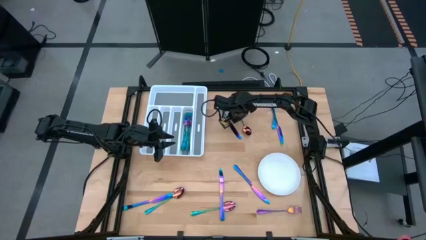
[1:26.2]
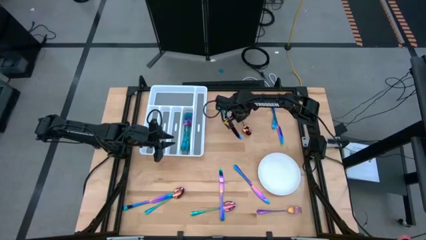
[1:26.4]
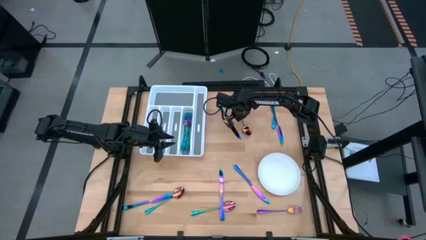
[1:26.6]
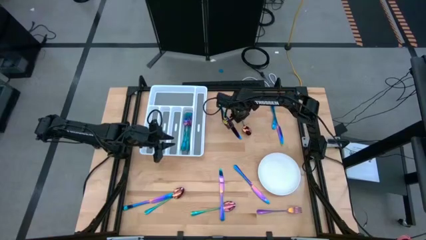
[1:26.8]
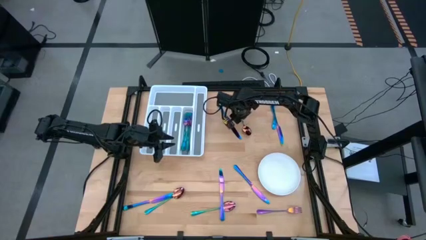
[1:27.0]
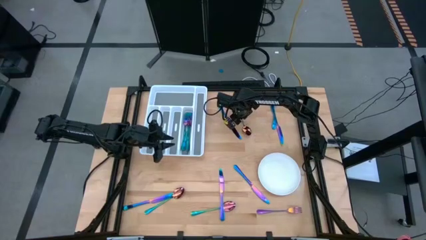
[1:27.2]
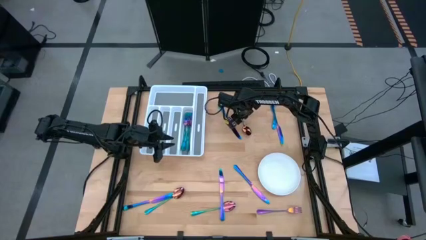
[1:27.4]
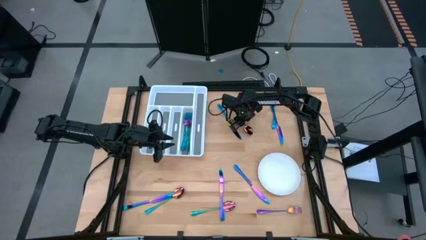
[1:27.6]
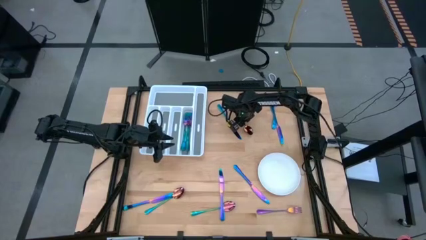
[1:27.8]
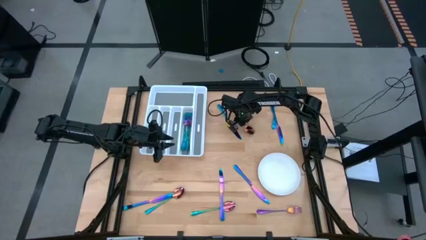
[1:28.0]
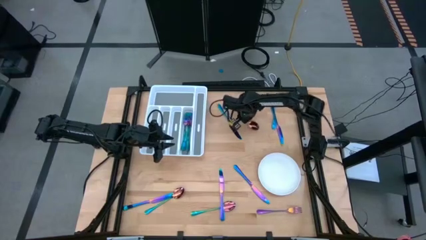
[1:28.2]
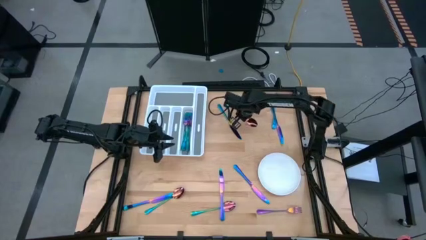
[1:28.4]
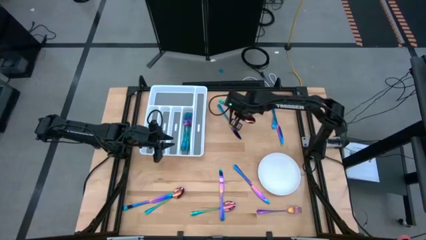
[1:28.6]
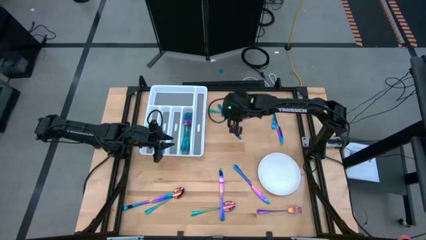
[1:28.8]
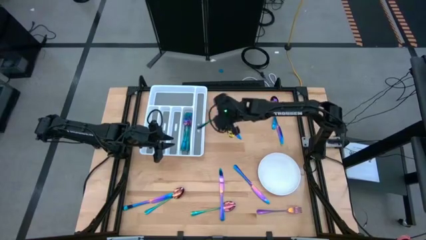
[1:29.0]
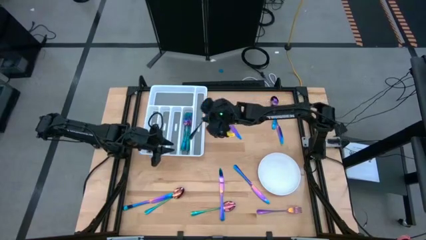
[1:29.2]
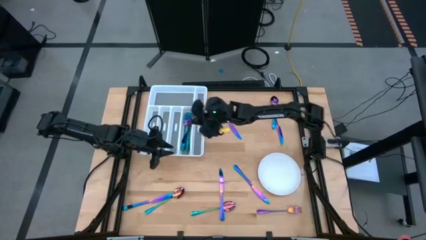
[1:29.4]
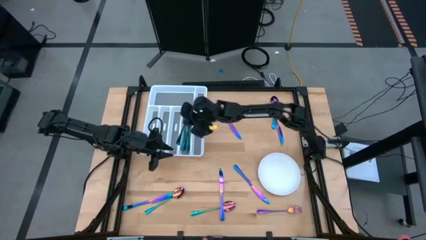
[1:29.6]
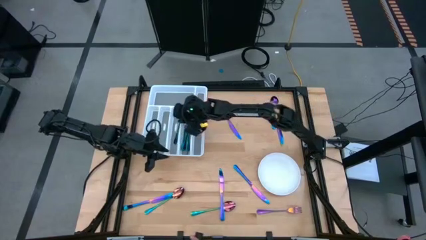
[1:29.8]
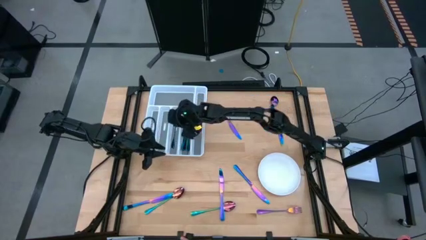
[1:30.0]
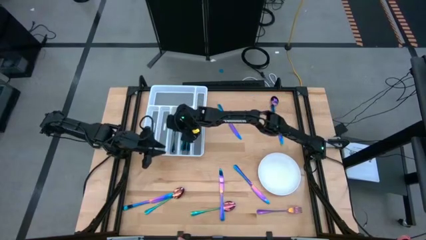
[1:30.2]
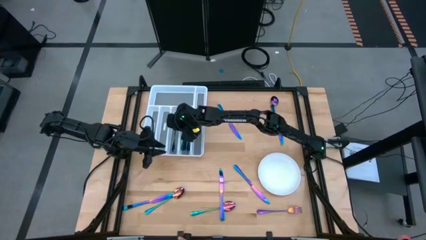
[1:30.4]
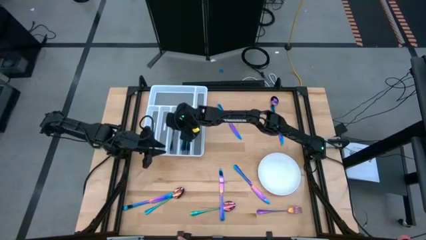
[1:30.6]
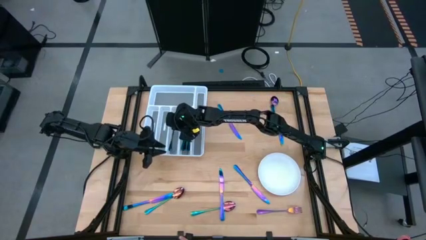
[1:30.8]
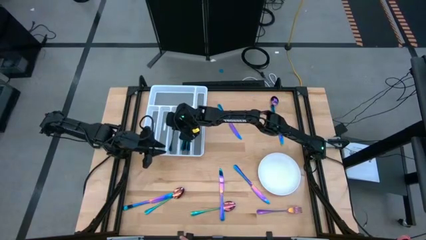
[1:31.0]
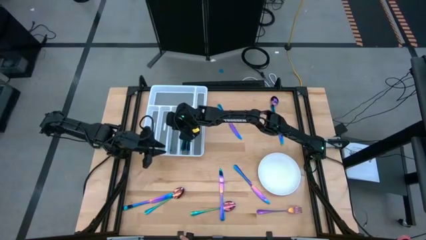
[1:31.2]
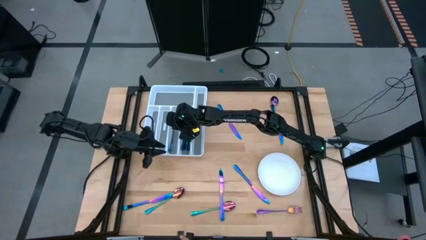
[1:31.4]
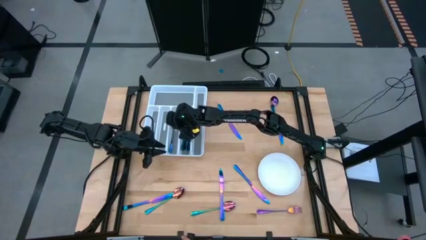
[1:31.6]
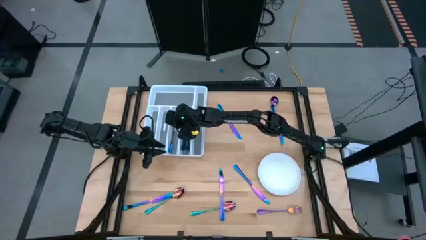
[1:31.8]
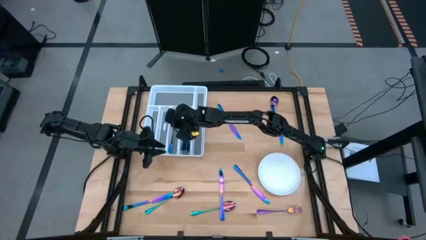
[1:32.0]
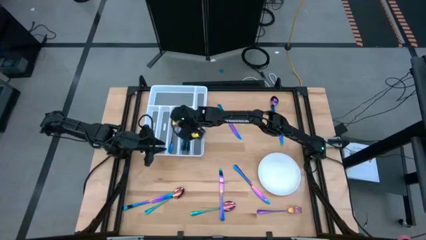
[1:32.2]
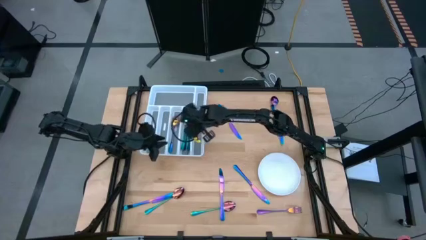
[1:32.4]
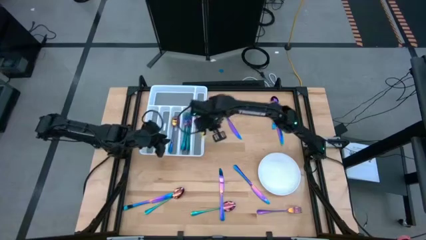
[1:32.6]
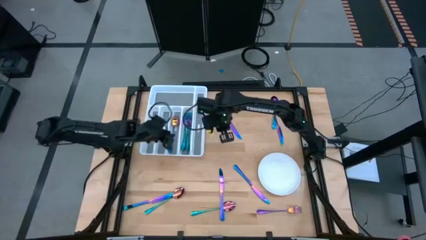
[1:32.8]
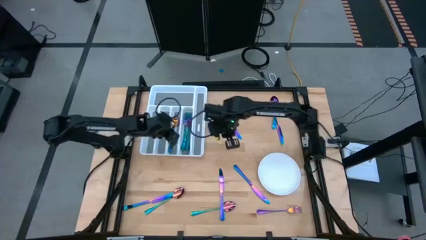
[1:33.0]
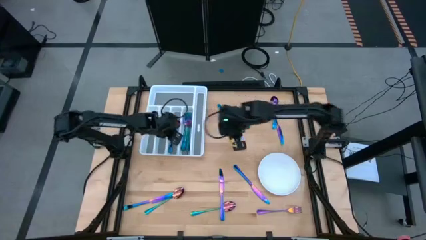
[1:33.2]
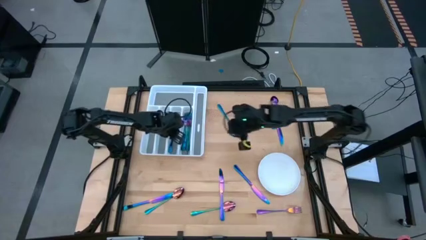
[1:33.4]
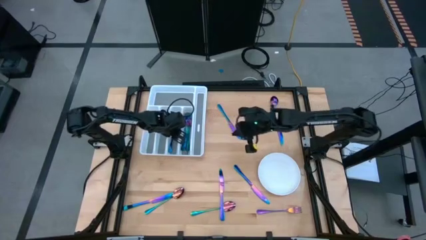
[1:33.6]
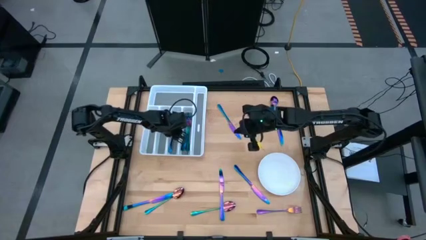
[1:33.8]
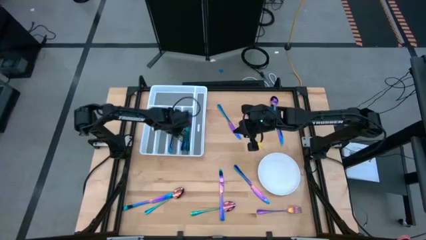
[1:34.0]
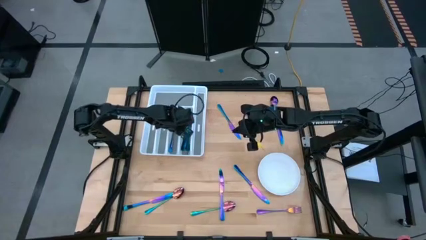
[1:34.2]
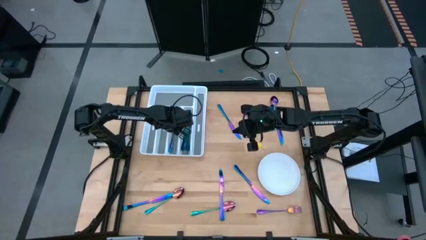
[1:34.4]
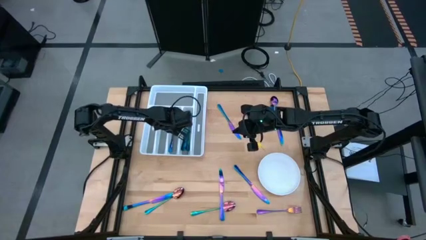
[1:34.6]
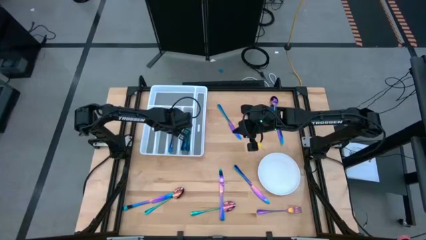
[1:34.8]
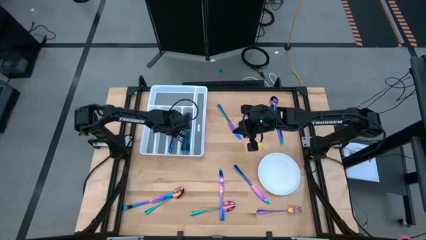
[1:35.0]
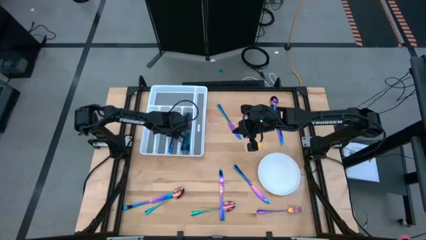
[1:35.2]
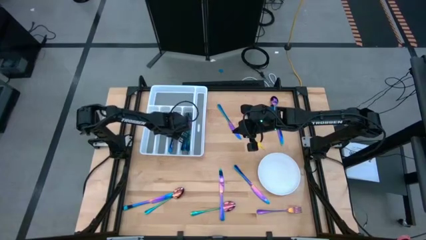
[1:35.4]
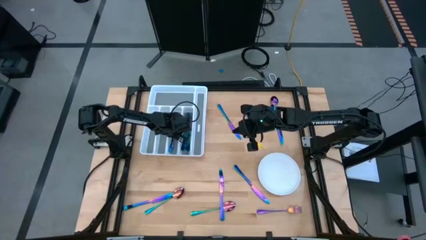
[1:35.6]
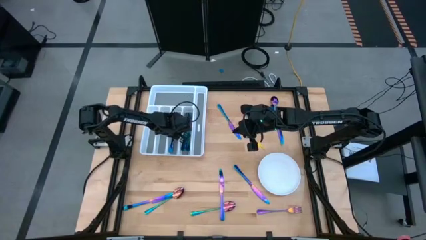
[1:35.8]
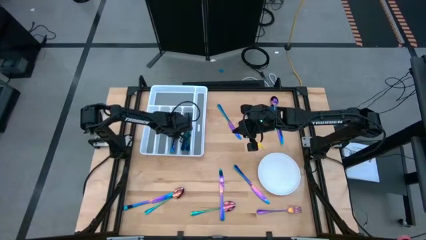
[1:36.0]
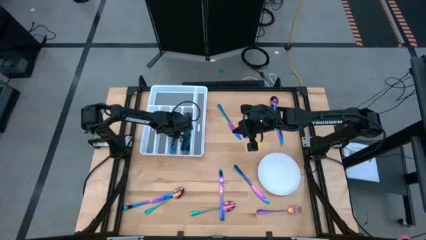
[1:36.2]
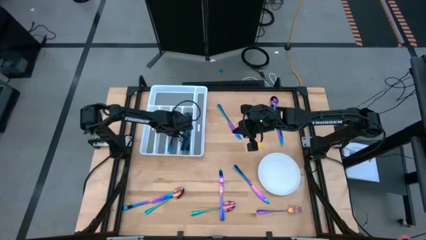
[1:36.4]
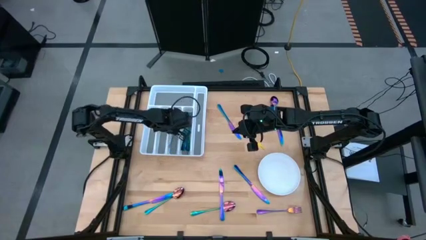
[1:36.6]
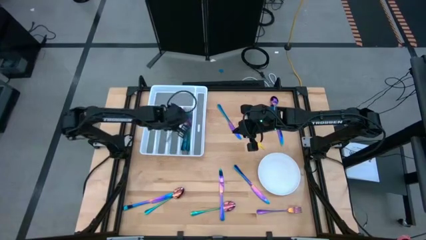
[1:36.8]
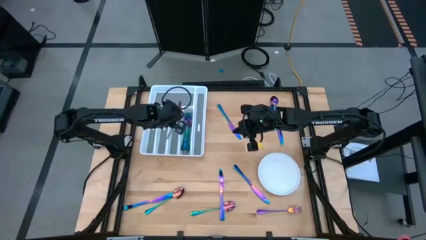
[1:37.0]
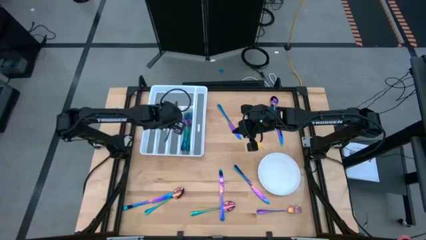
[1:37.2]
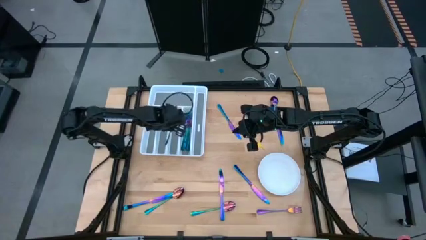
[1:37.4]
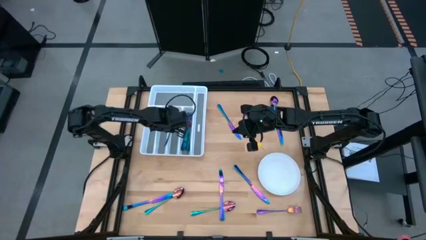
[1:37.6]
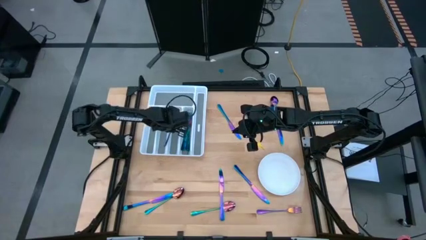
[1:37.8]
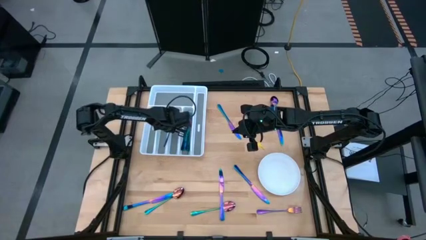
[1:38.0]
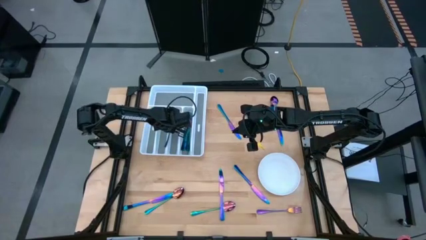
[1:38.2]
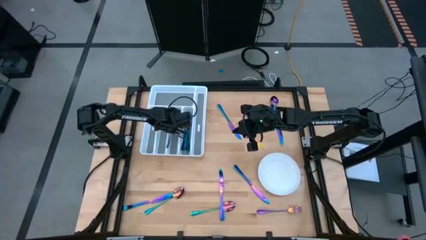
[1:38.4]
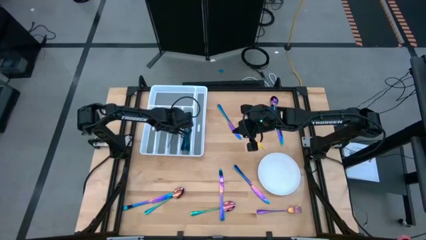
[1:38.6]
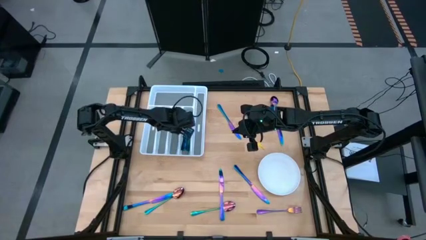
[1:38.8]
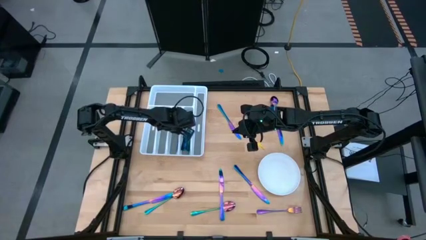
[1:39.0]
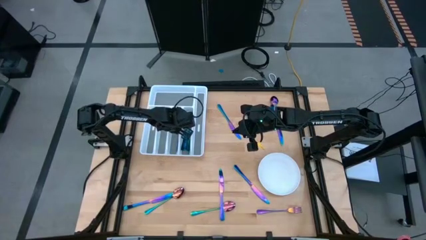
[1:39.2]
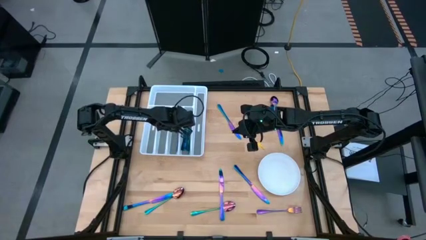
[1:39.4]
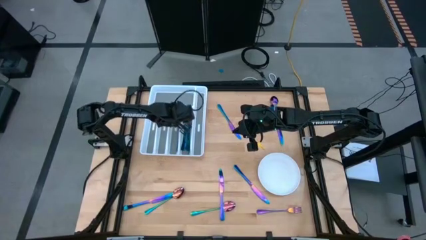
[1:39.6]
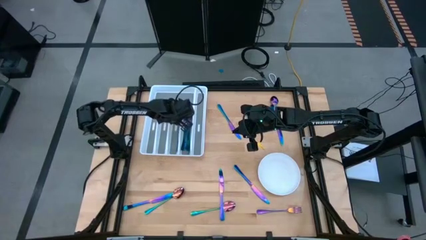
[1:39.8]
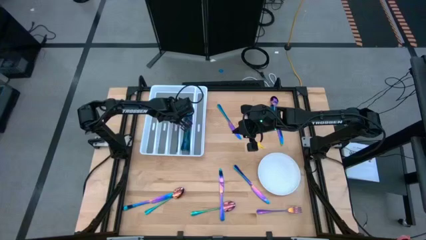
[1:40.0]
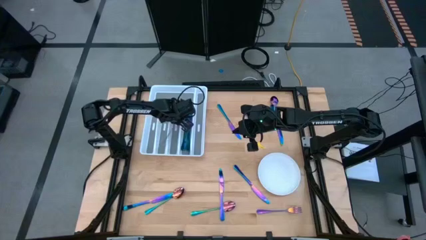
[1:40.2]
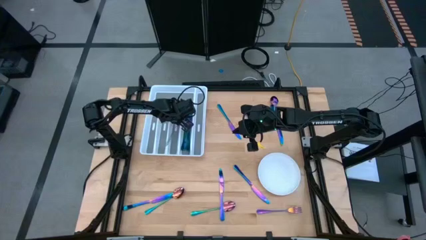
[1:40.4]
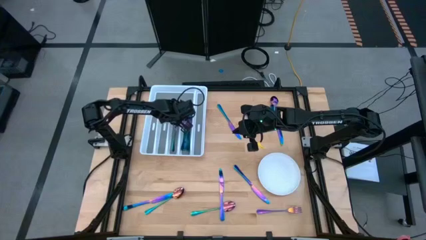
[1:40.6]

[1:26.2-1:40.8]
Task: Sort silverware
Put the iridescent spoon into the white silverware tray
